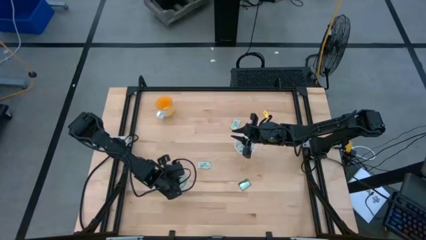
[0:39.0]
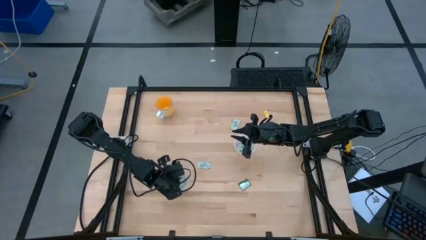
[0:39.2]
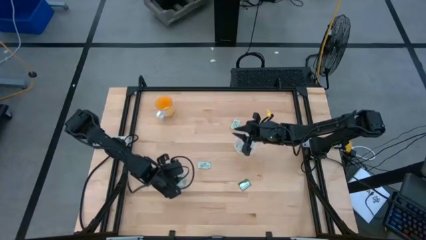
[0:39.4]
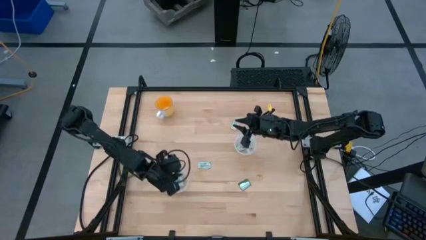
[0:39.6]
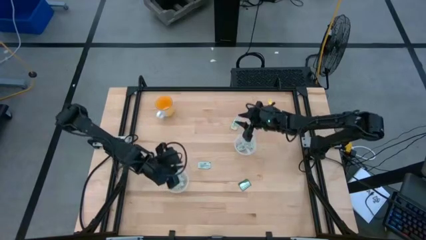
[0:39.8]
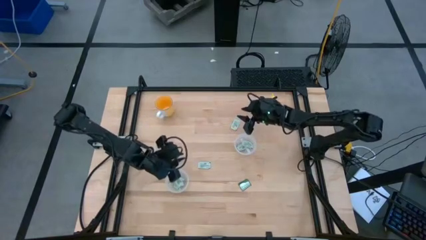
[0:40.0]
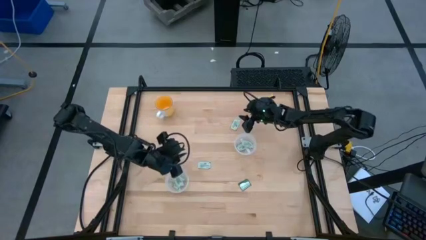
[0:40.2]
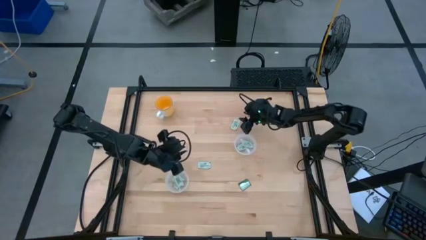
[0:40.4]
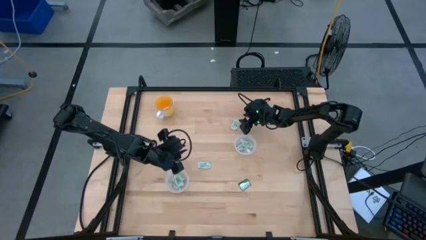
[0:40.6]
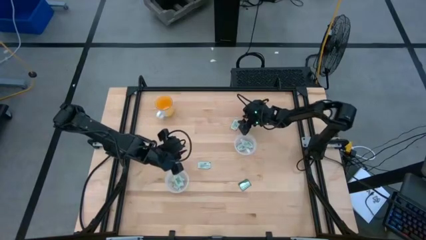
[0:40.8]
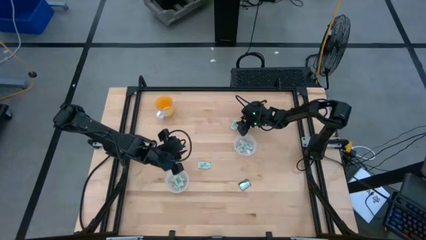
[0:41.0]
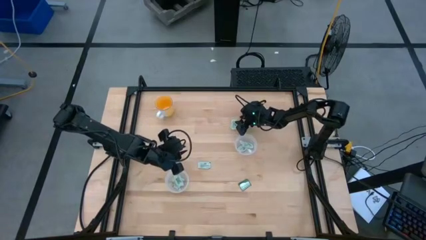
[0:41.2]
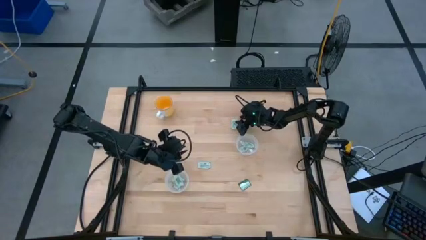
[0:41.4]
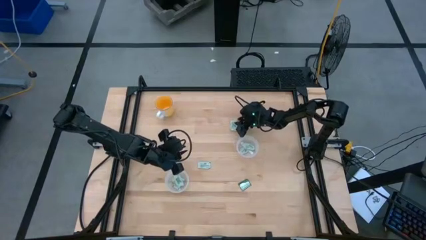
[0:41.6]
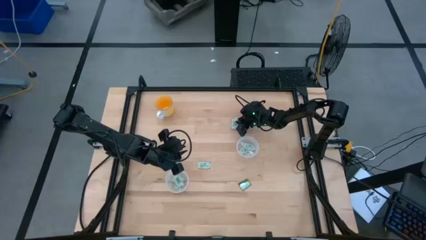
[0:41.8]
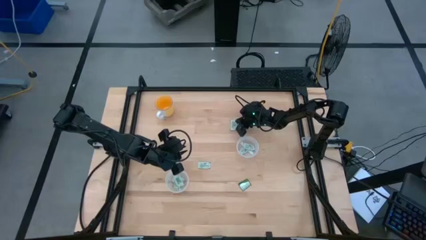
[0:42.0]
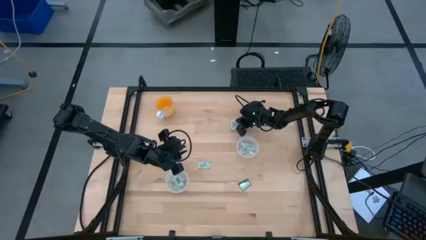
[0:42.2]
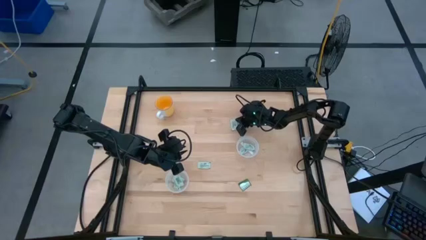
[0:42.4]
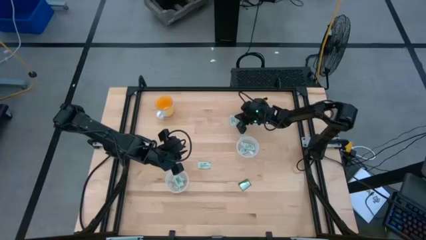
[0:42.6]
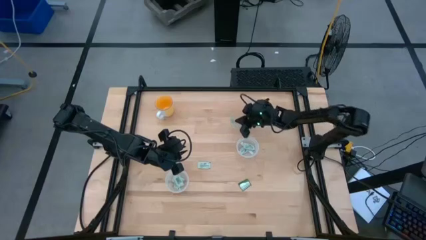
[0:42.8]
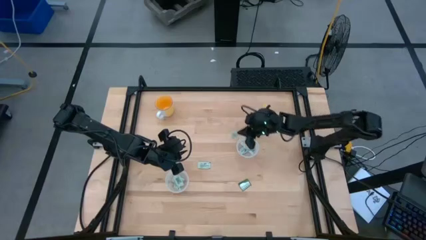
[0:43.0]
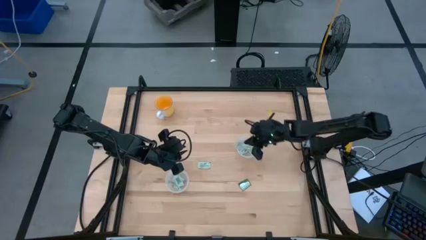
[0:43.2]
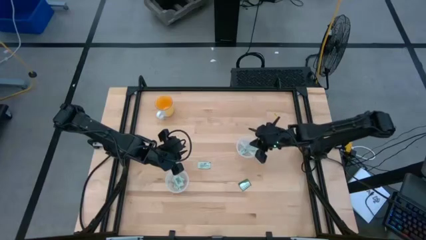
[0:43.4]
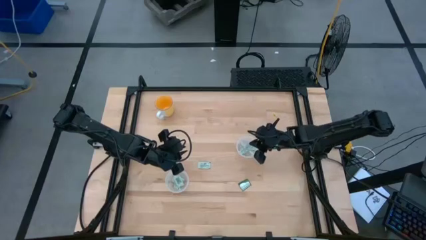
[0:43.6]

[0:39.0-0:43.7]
Task: Pick and place Stevia / Truvia into bins
Put the stevia packet into the right transparent container

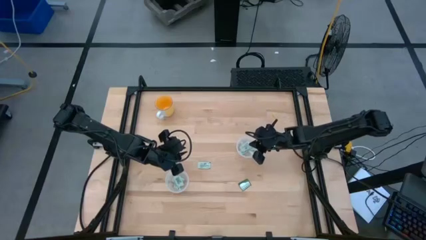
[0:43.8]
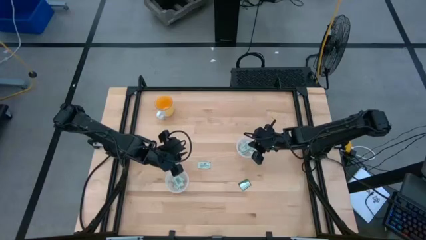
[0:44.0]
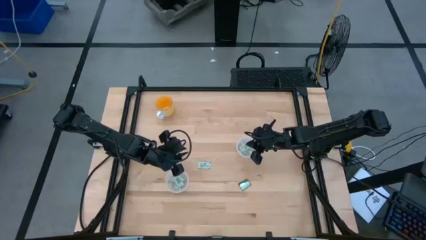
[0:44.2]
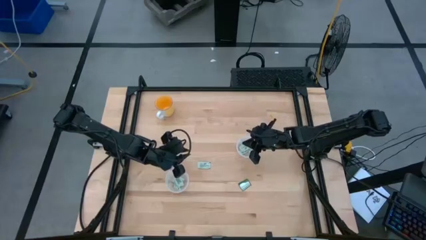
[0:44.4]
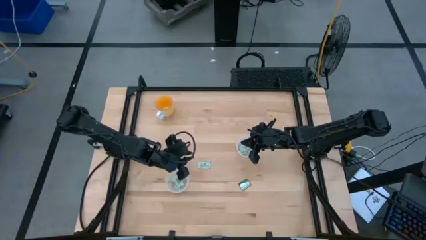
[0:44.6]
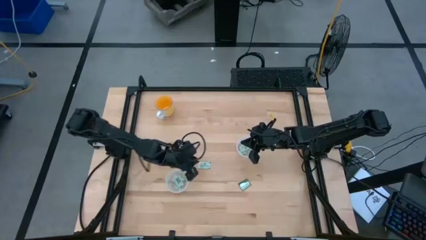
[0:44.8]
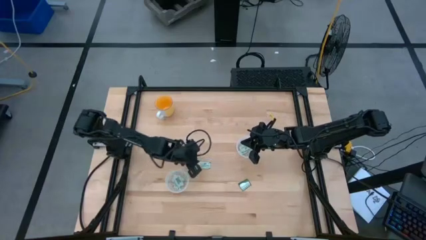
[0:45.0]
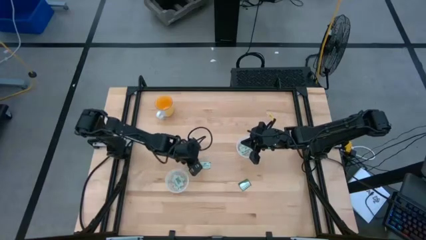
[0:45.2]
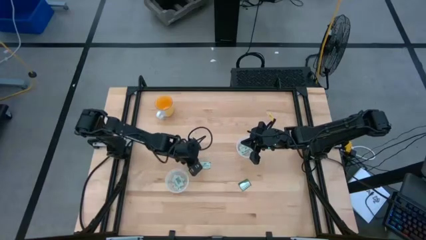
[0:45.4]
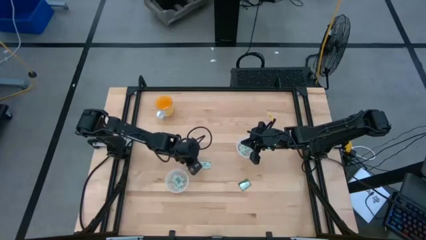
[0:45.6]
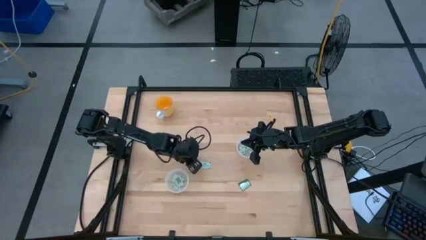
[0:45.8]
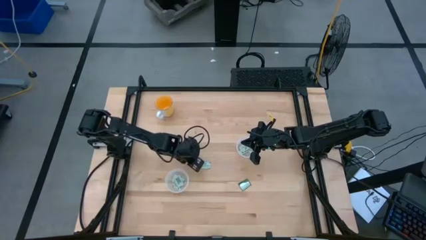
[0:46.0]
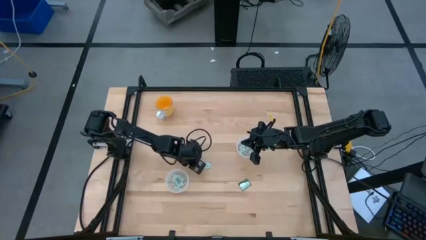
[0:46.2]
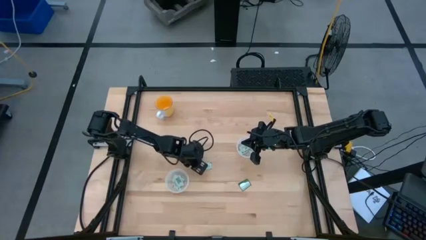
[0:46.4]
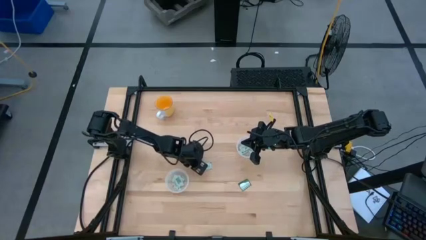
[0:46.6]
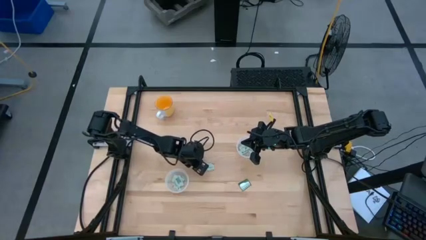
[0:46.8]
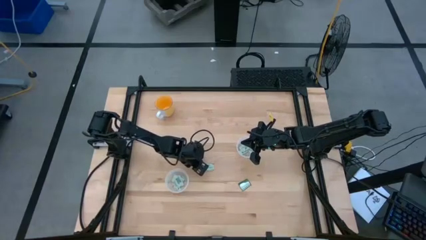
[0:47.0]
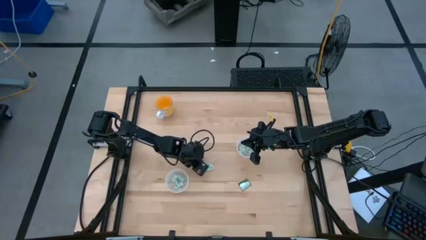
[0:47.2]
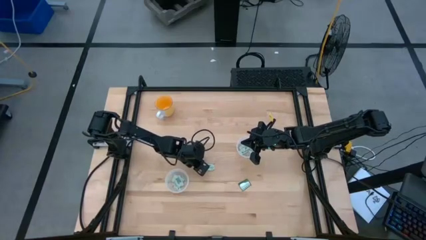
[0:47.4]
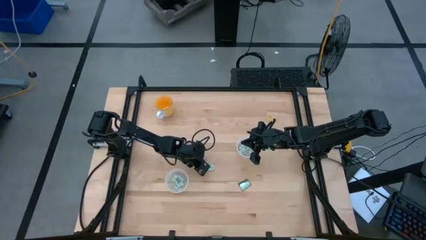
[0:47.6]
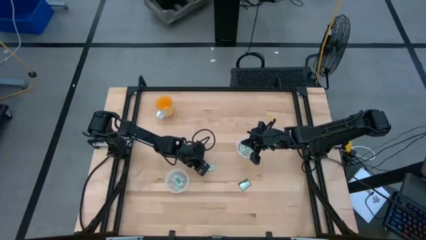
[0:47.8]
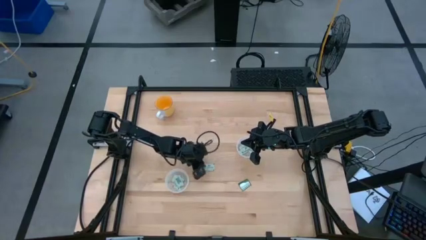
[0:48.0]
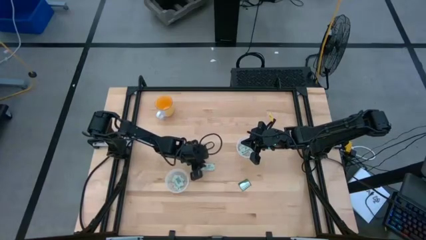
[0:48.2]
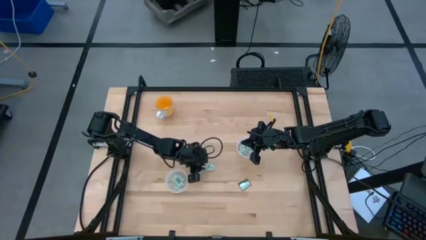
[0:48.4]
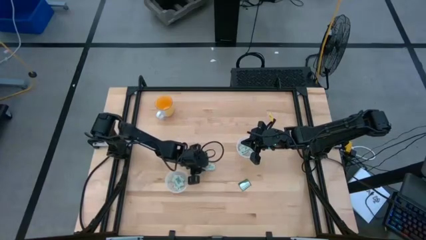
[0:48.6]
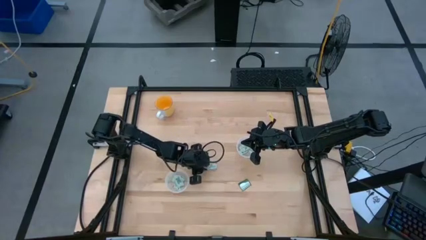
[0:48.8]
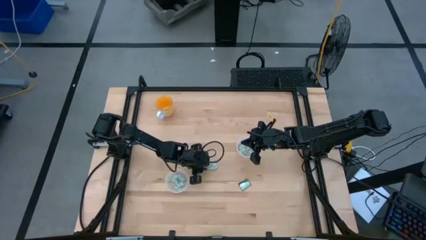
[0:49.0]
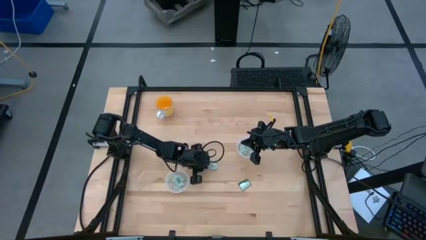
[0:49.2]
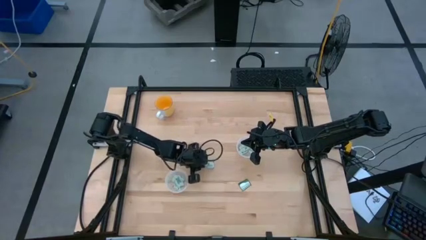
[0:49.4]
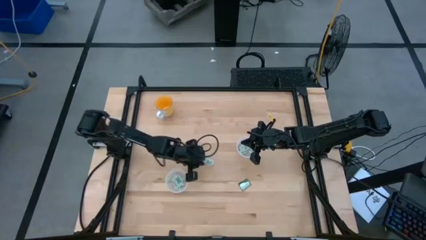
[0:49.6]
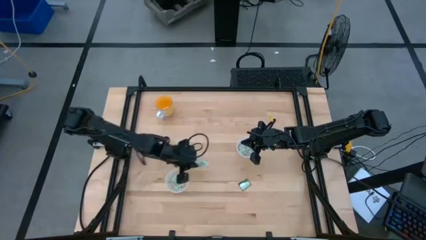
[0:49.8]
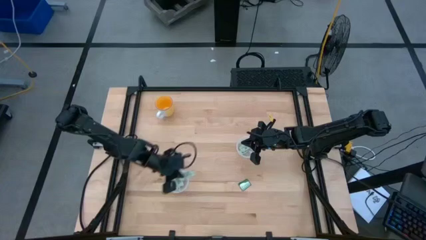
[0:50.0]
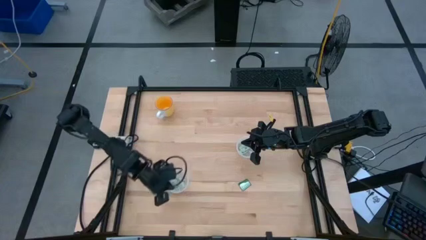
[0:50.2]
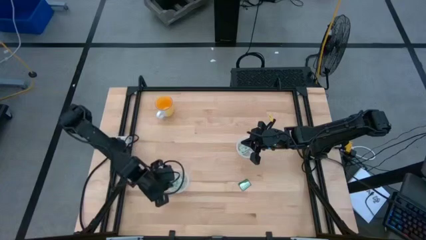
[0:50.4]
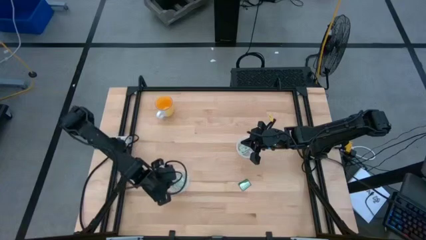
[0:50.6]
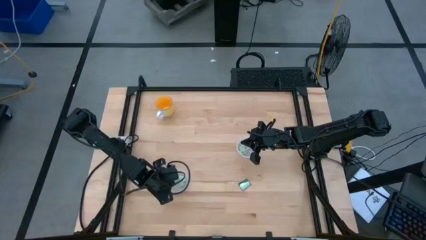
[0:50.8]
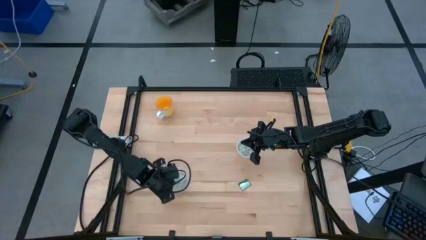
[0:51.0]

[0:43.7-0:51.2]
Put the stevia packet into the left transparent container

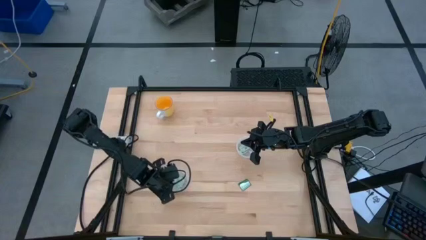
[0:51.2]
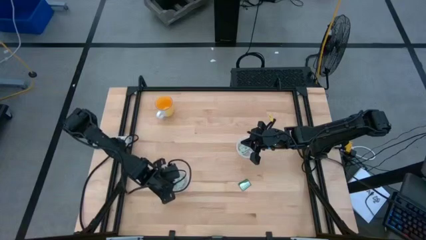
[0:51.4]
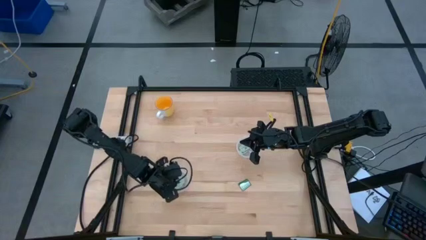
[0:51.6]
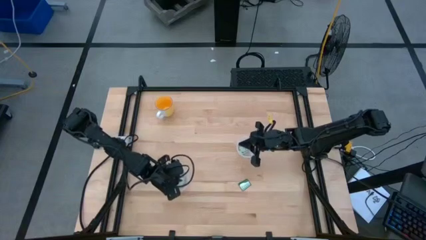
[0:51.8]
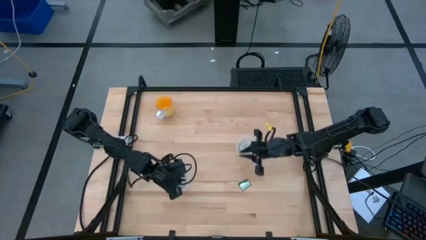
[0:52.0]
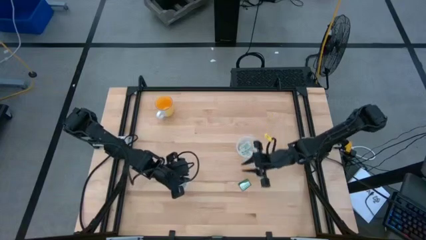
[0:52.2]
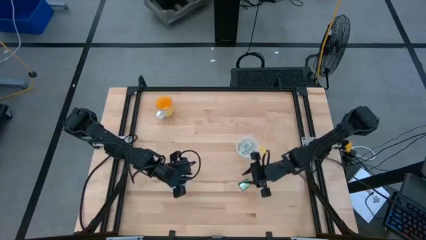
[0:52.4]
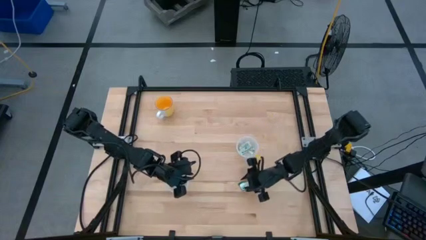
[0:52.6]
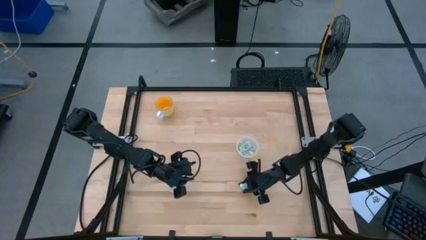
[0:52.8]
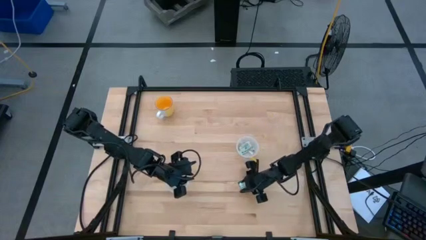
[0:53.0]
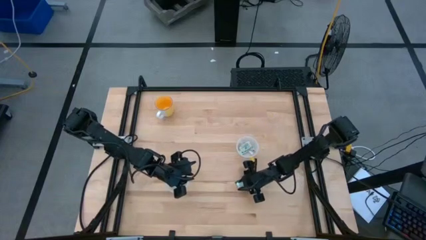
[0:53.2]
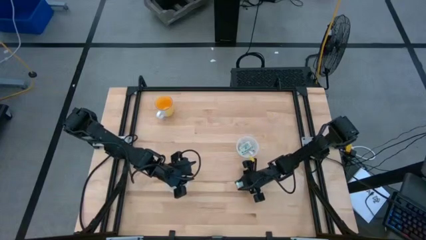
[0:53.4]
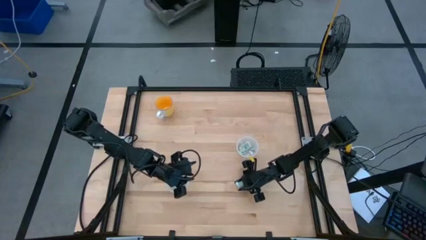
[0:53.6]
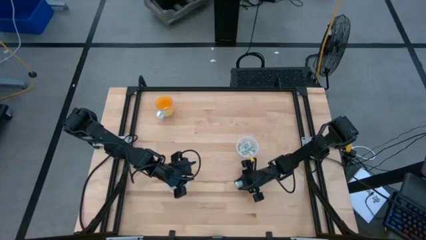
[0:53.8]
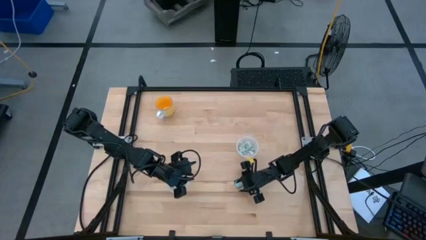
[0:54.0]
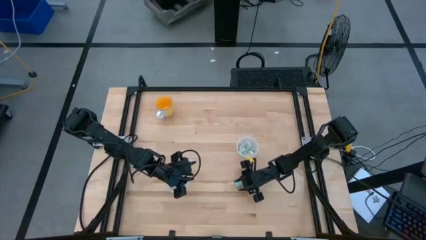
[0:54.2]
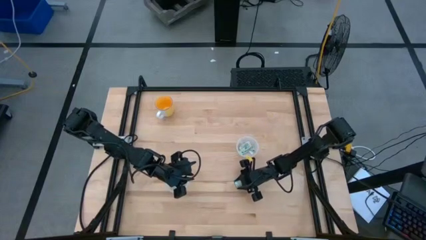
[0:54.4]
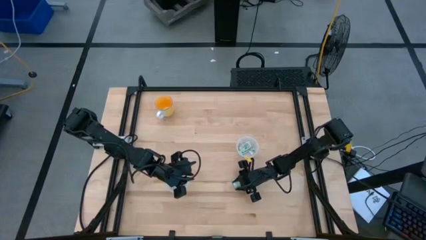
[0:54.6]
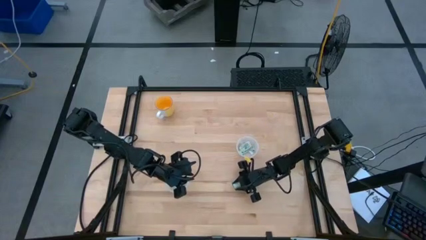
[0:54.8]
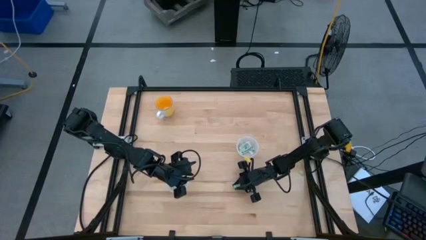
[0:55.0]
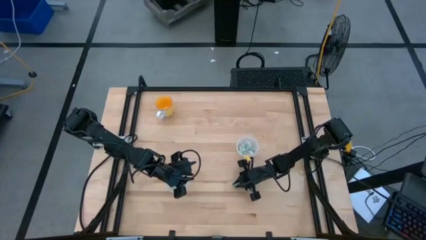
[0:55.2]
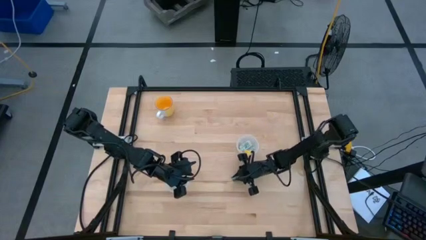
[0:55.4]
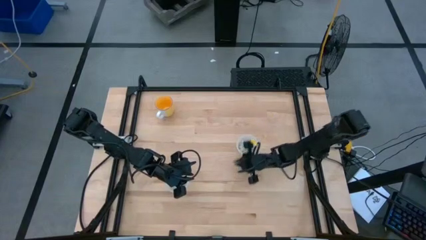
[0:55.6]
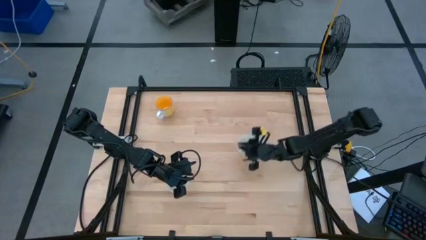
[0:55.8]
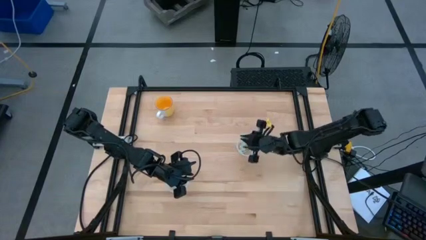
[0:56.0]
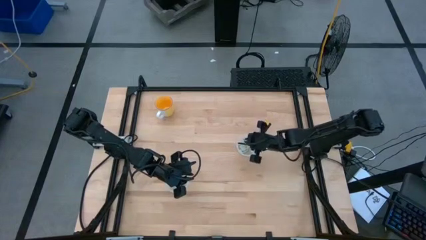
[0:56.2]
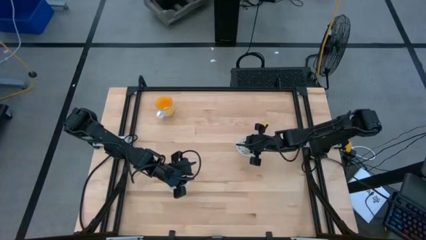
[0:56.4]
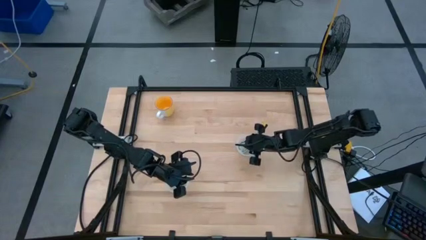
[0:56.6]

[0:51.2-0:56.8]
Put the truvia packet into the right transparent container
